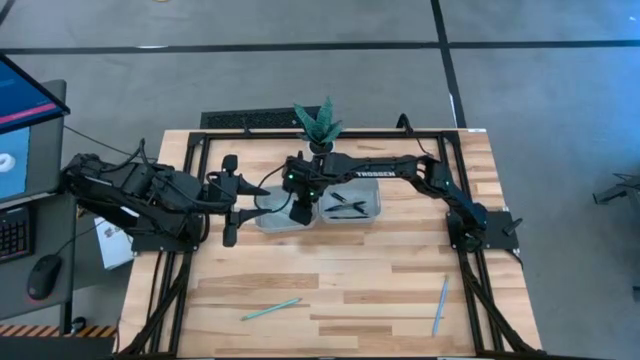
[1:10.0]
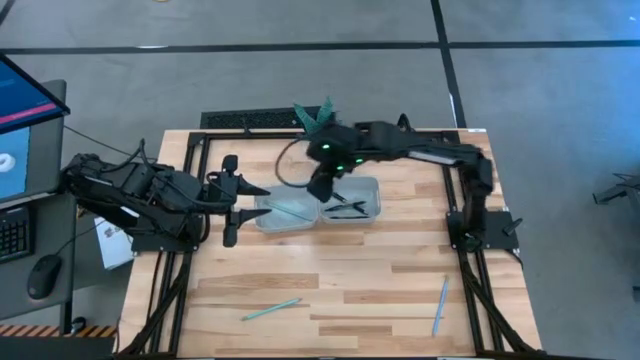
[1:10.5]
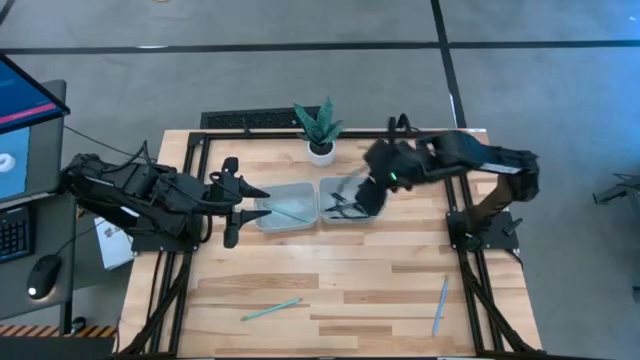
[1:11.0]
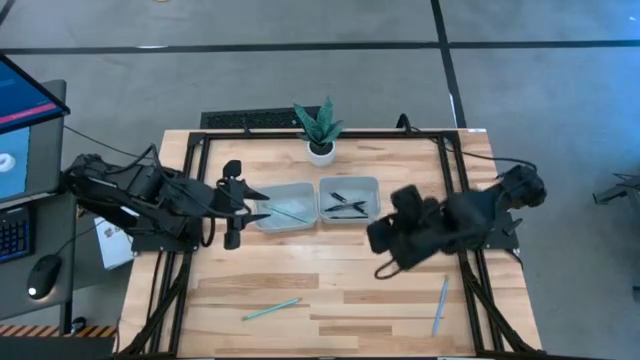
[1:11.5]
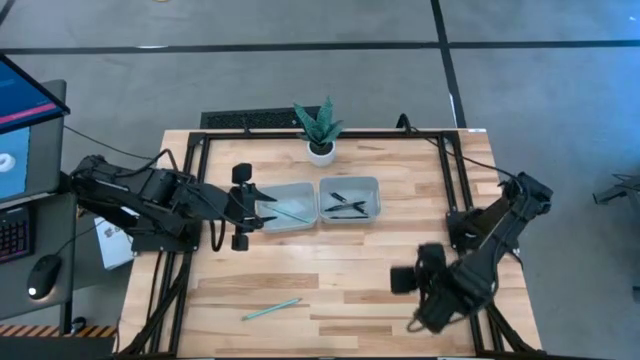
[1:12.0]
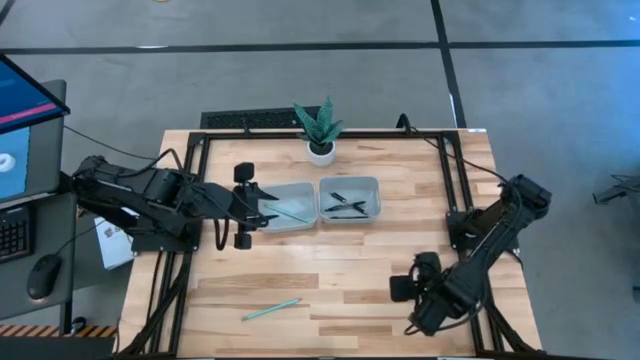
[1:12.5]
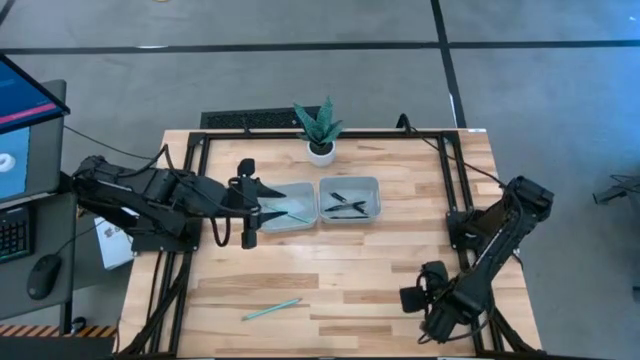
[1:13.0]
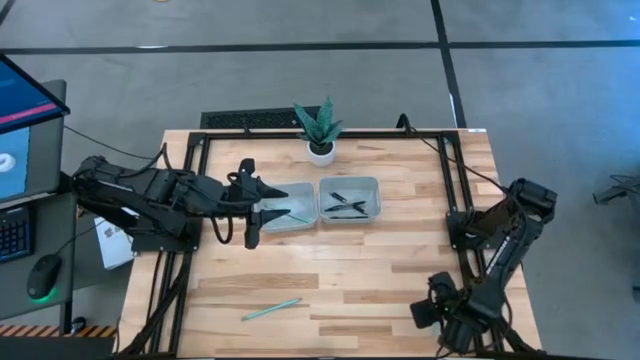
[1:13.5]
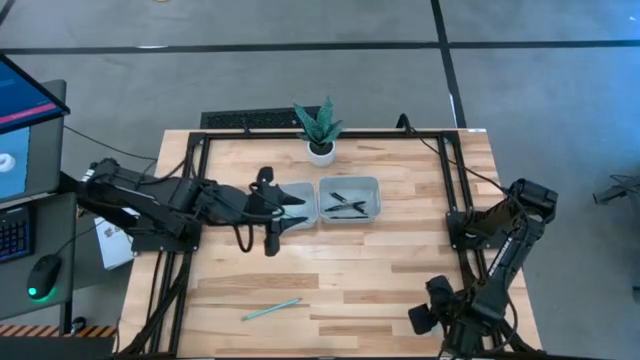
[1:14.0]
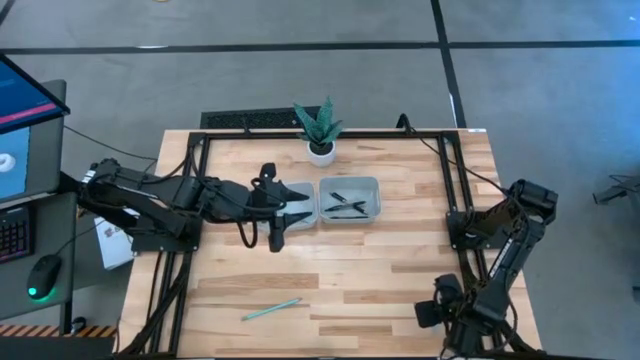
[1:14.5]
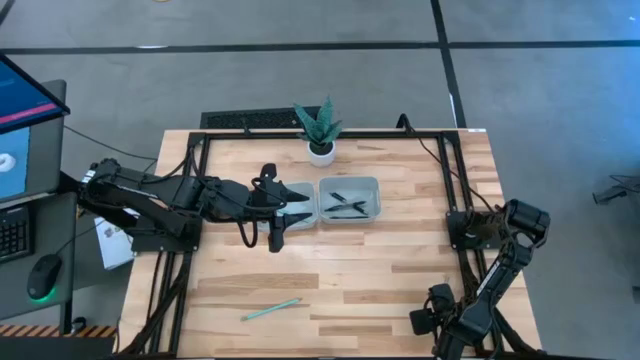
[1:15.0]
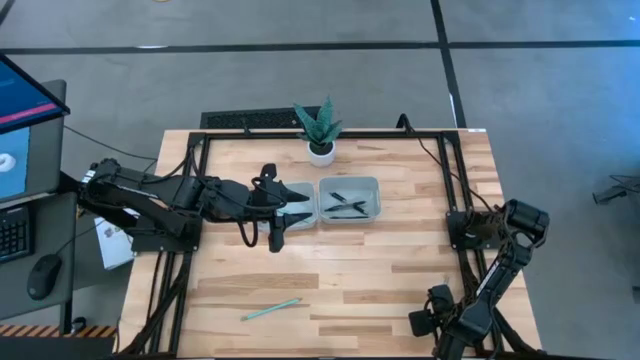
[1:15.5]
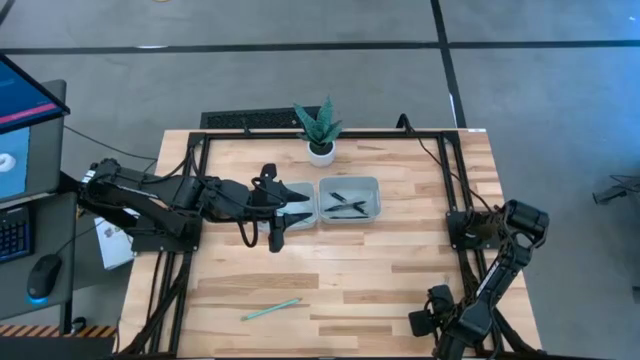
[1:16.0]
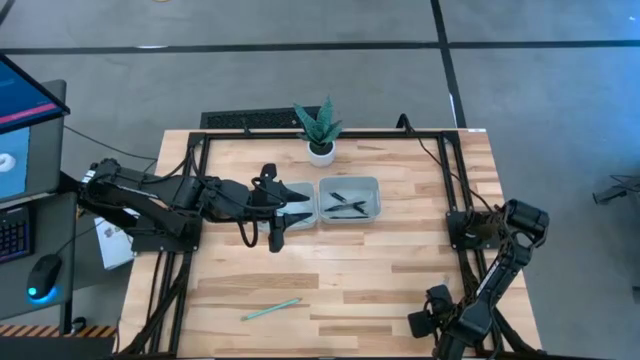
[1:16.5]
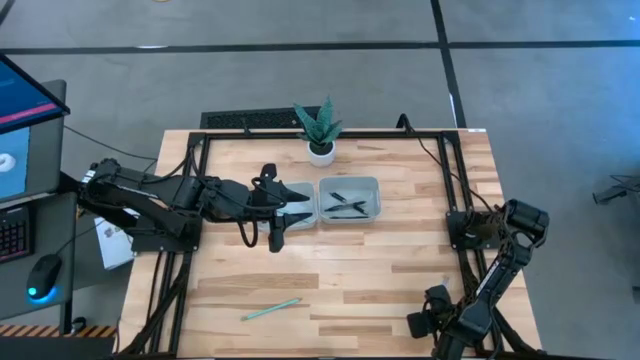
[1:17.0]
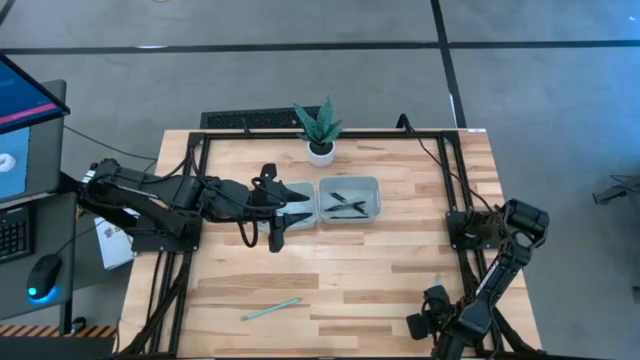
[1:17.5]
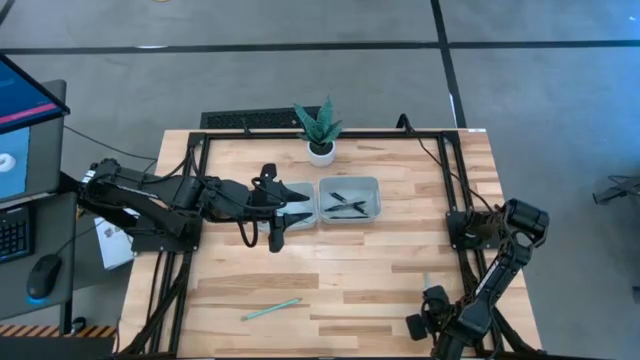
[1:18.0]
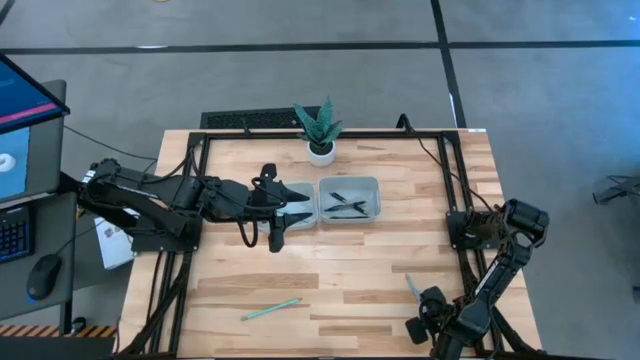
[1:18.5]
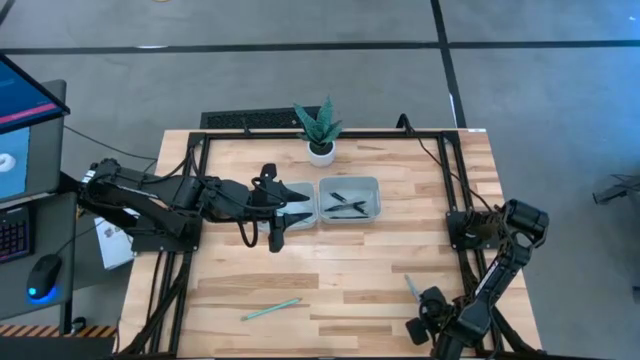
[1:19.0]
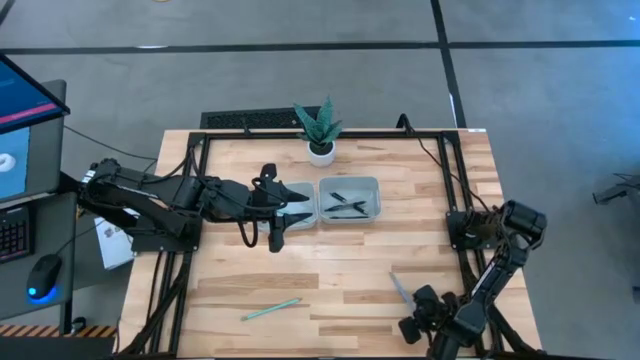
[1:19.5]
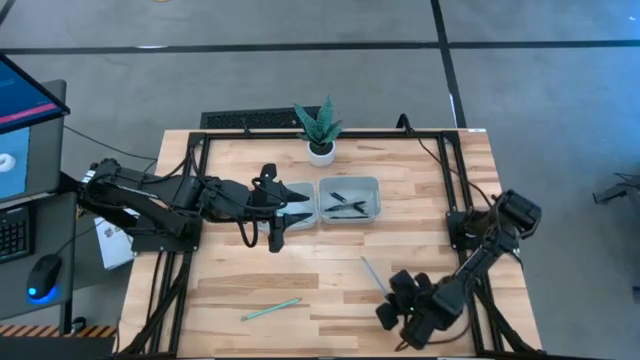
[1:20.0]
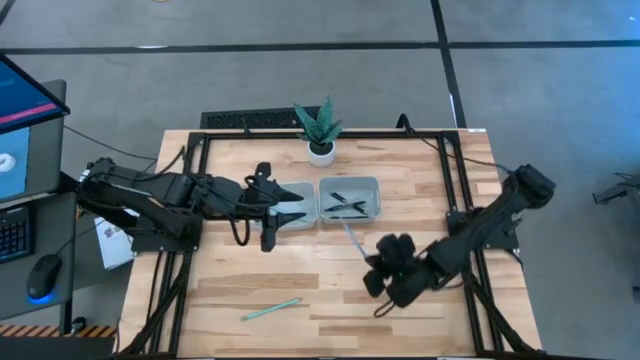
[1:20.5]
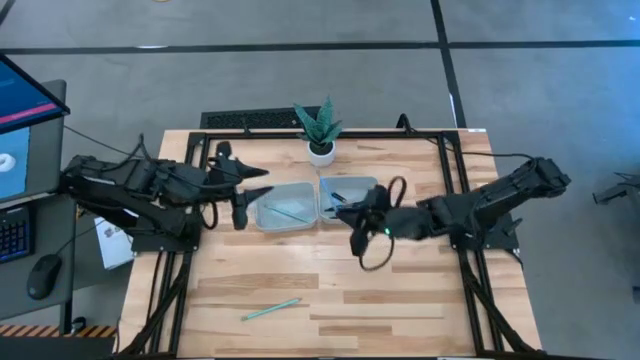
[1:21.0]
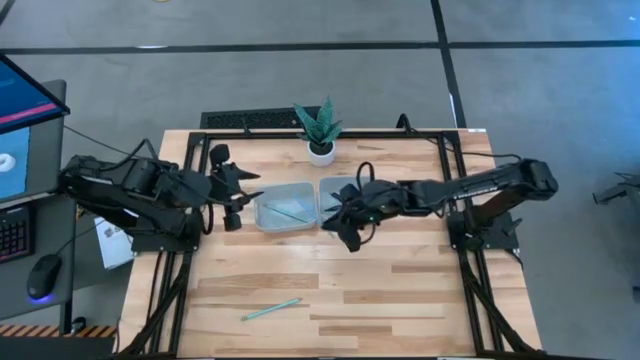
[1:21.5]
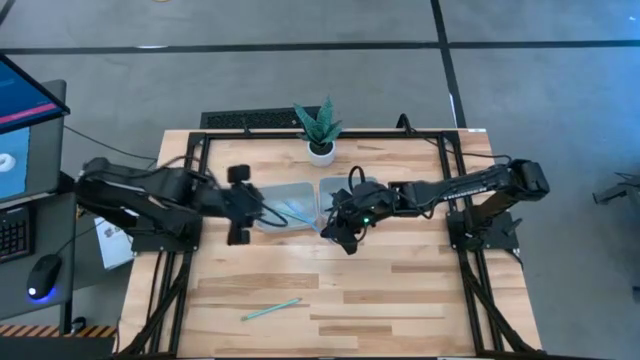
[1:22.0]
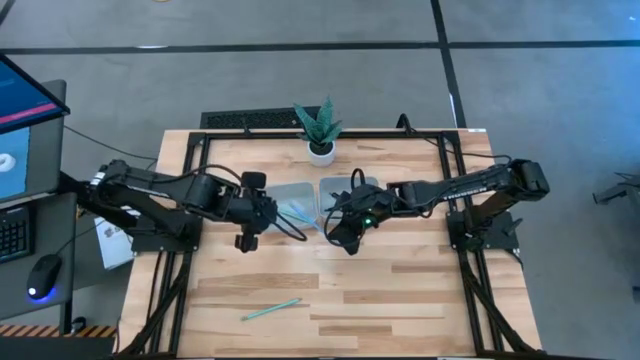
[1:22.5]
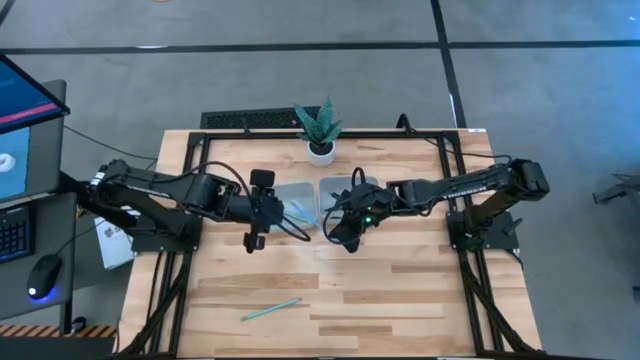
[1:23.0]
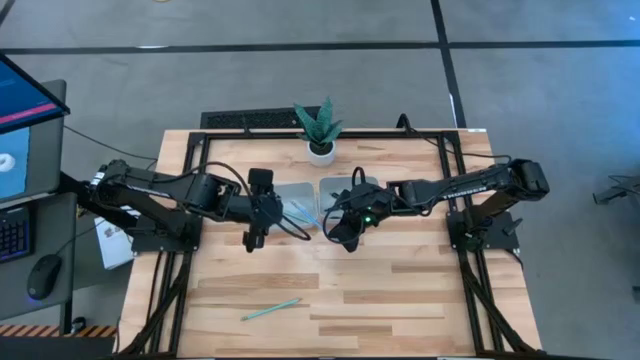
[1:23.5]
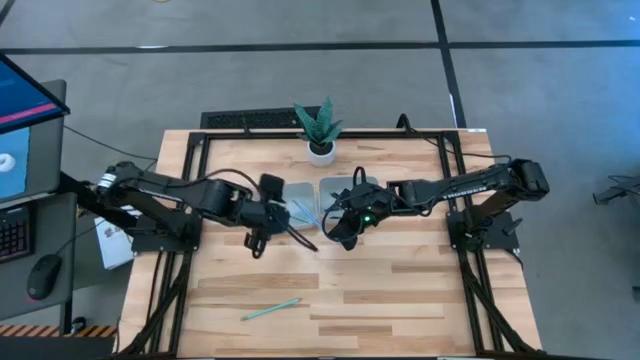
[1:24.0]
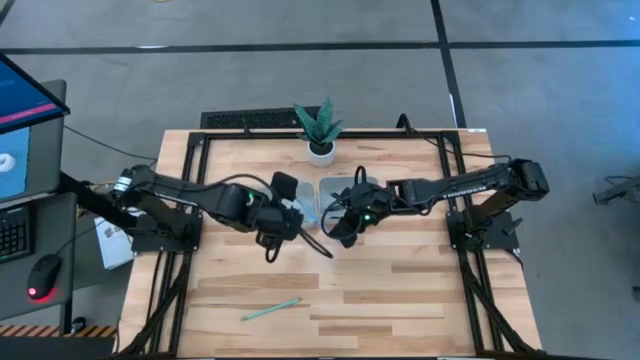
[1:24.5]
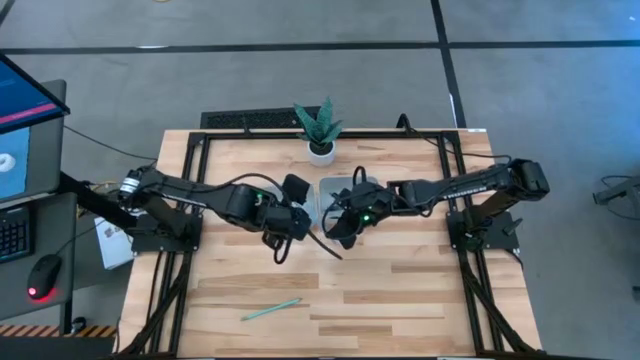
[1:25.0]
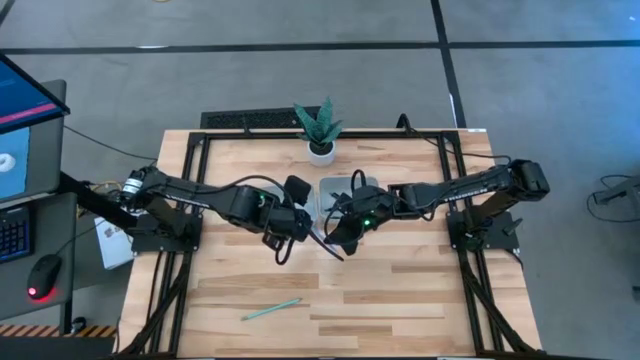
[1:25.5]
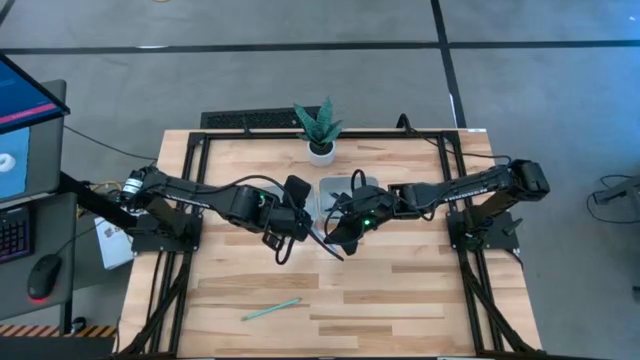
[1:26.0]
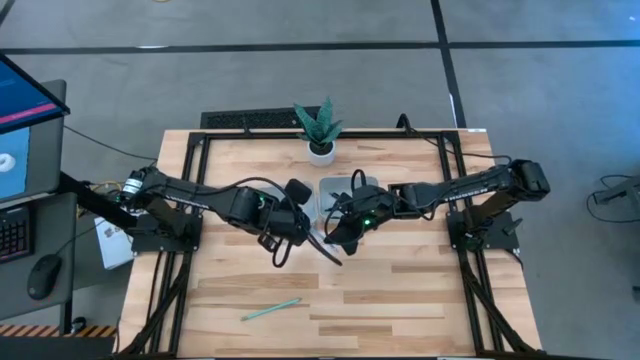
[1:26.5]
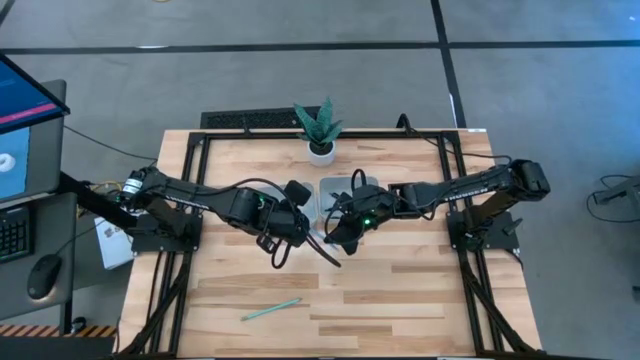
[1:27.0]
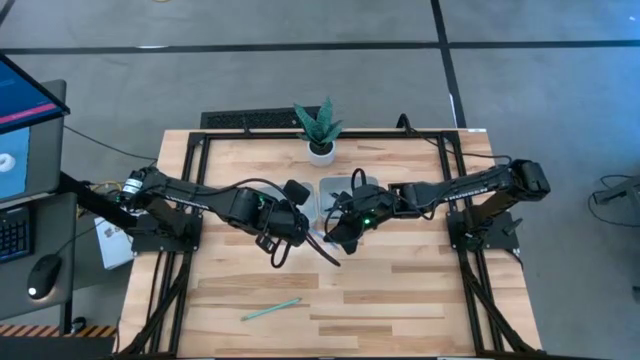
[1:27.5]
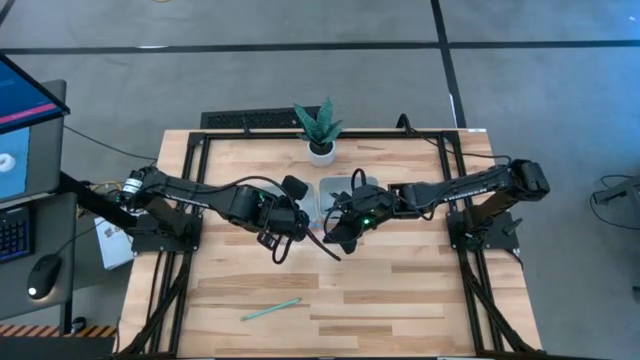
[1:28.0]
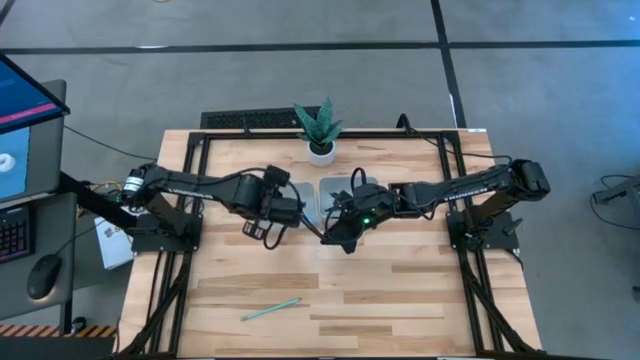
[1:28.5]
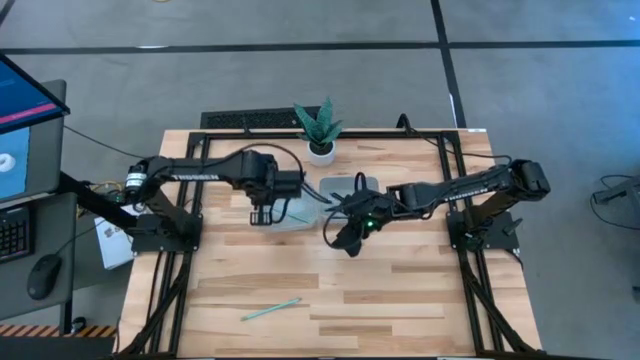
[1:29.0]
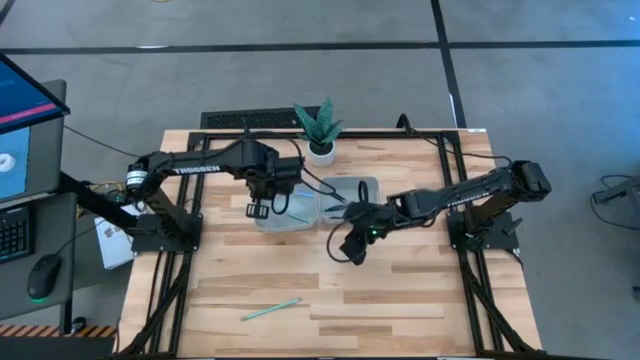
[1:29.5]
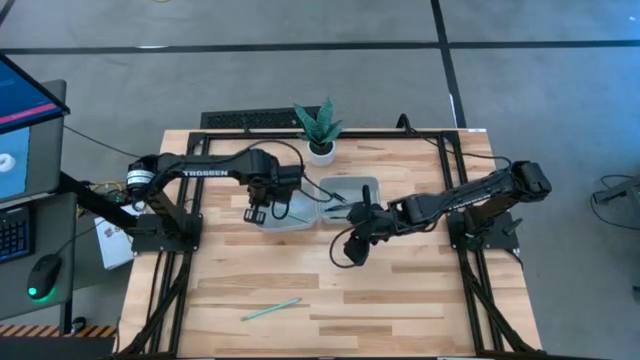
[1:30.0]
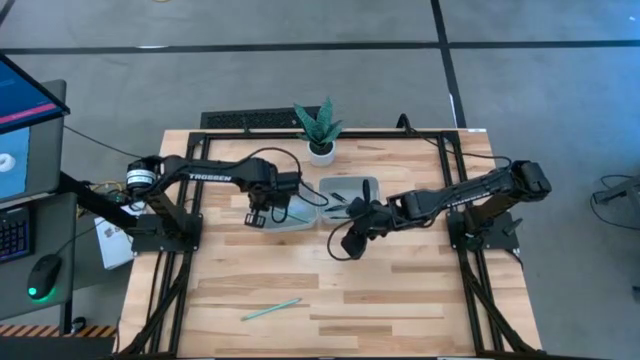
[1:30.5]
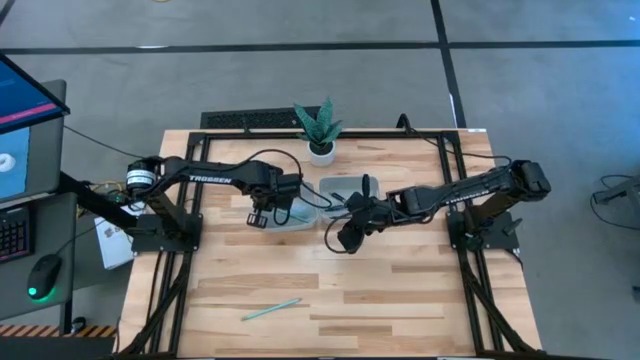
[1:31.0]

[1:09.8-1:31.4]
Task: Sort pens & pencils
Put the blue pencil into the left gray bin
